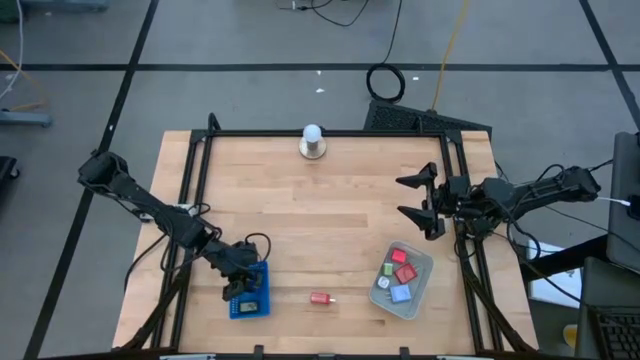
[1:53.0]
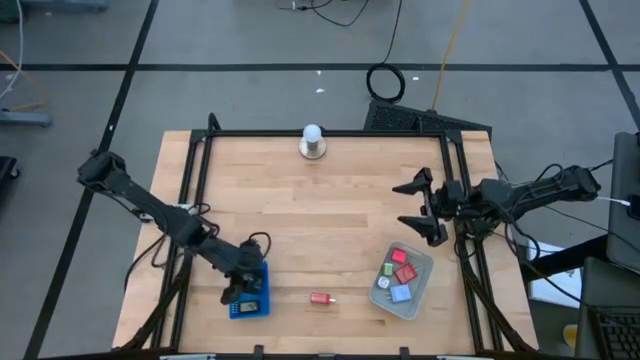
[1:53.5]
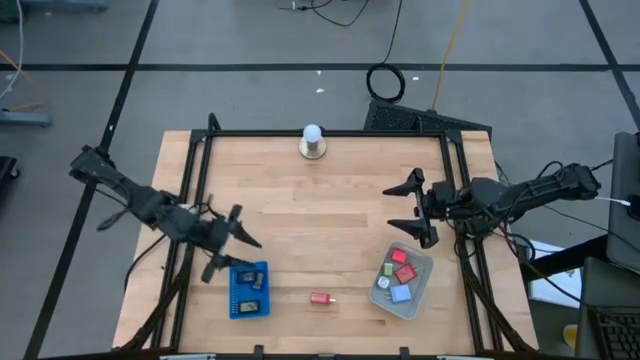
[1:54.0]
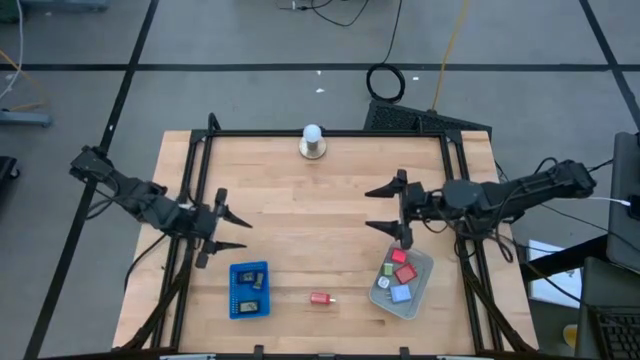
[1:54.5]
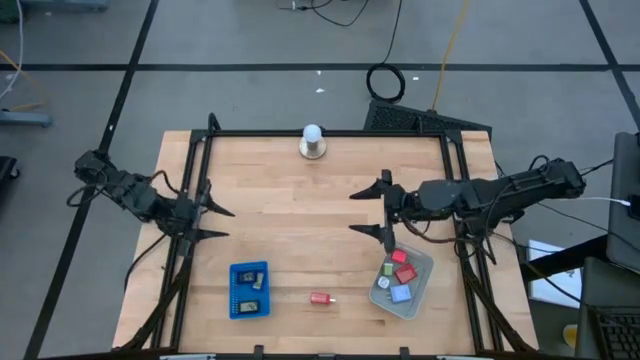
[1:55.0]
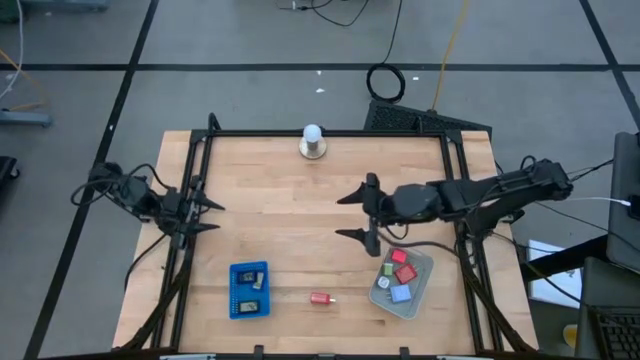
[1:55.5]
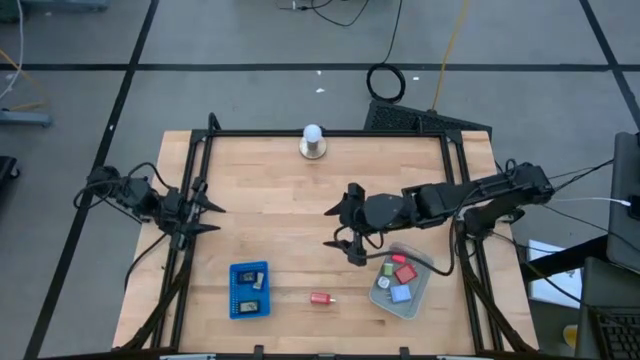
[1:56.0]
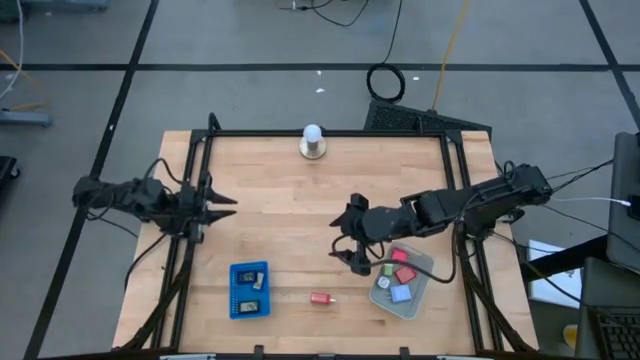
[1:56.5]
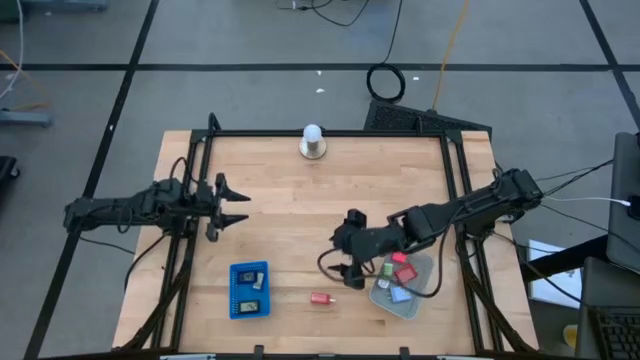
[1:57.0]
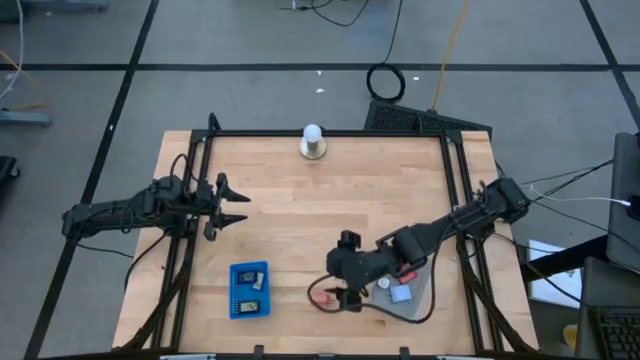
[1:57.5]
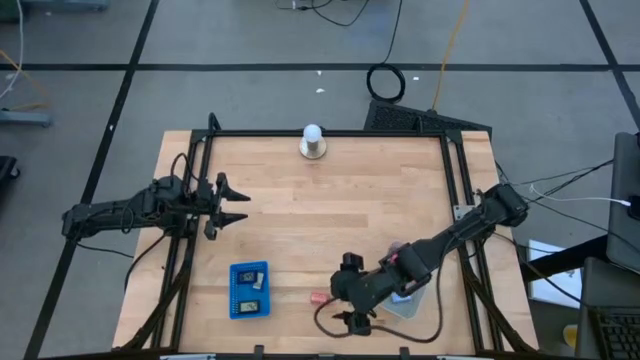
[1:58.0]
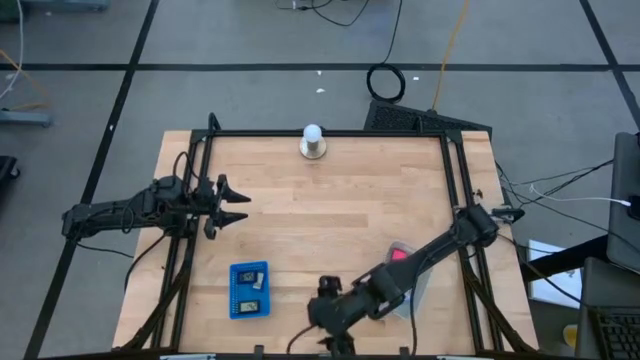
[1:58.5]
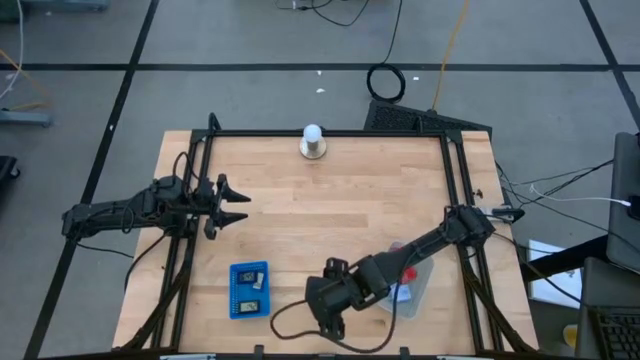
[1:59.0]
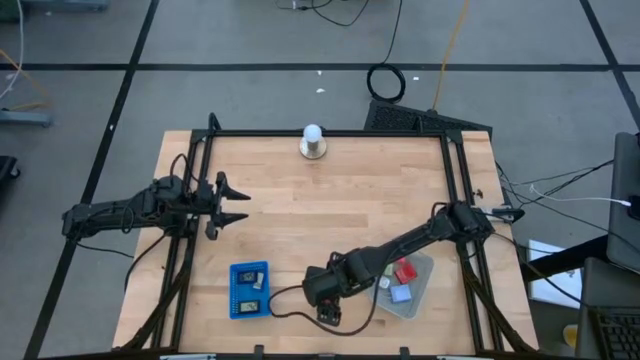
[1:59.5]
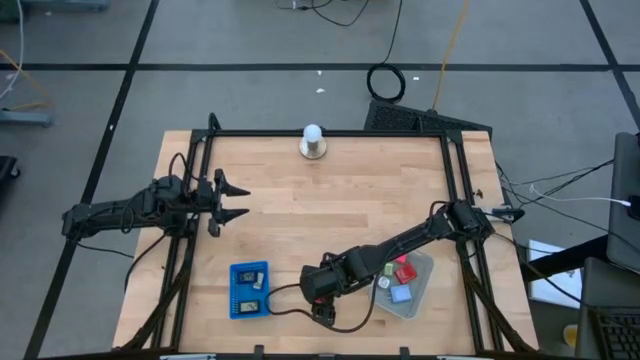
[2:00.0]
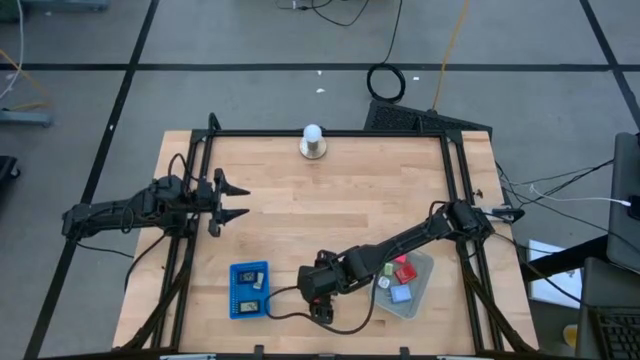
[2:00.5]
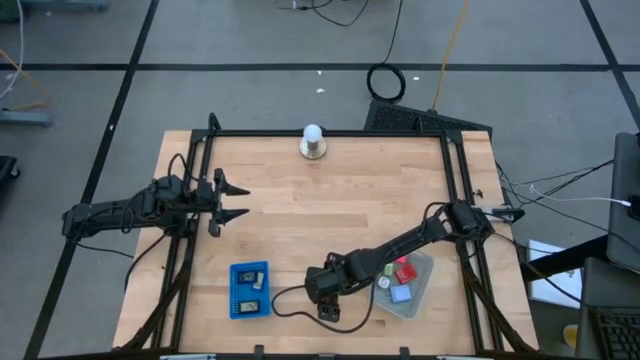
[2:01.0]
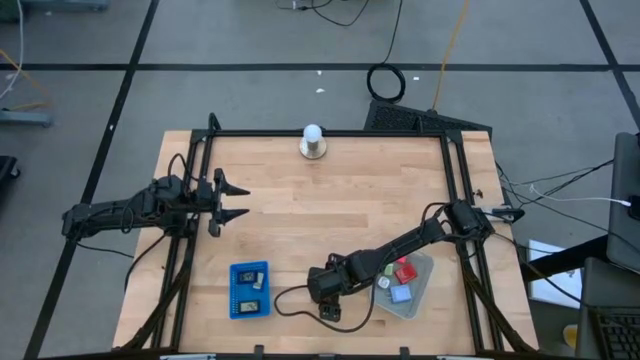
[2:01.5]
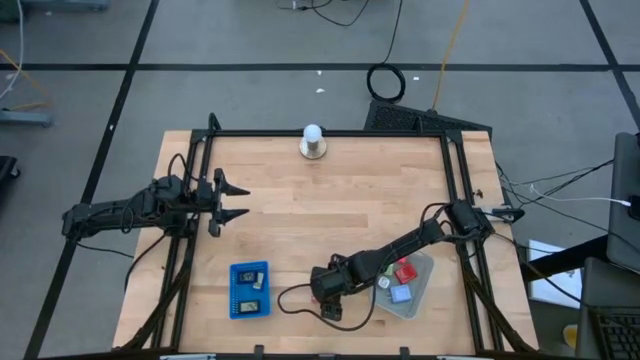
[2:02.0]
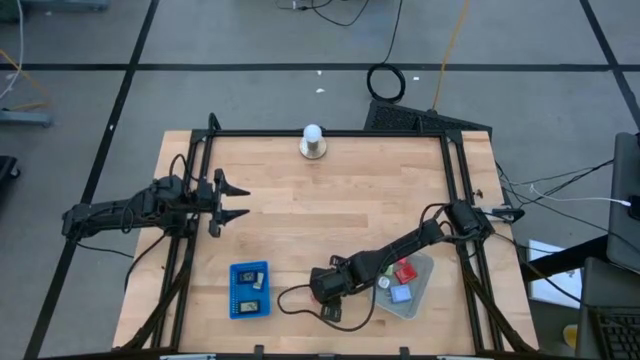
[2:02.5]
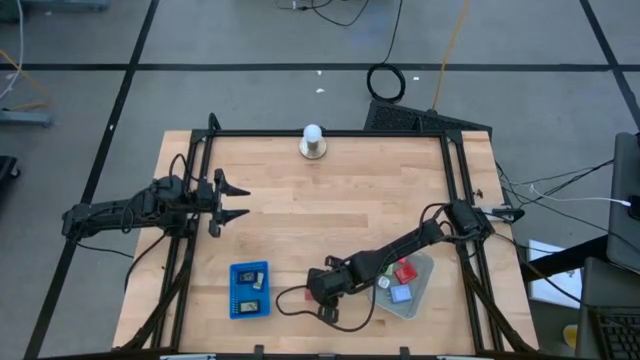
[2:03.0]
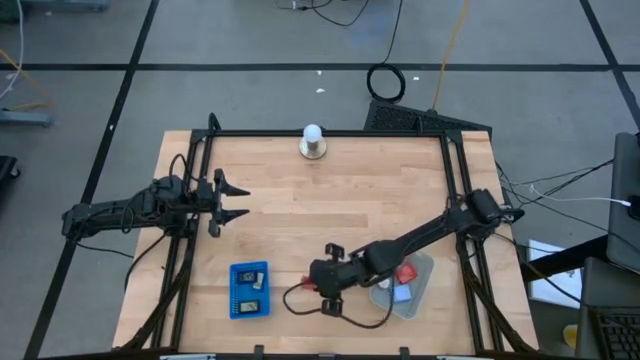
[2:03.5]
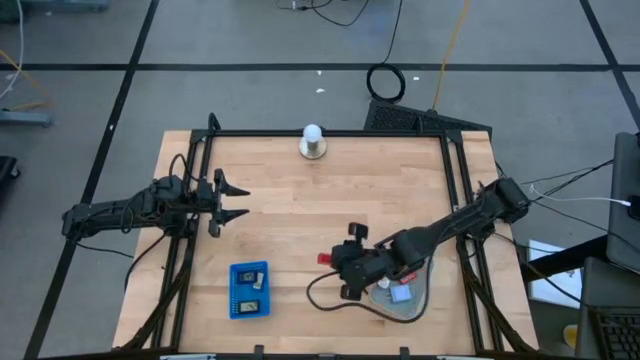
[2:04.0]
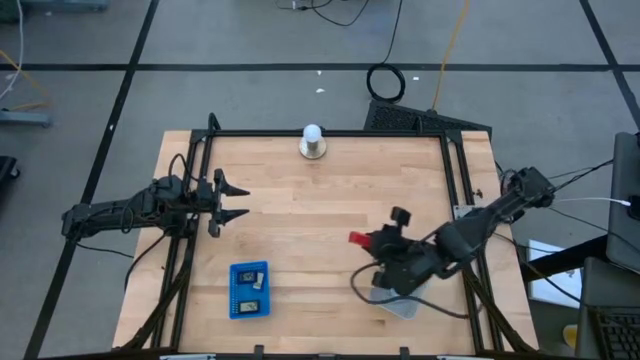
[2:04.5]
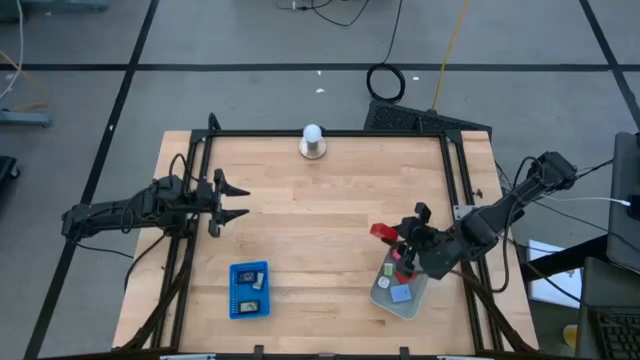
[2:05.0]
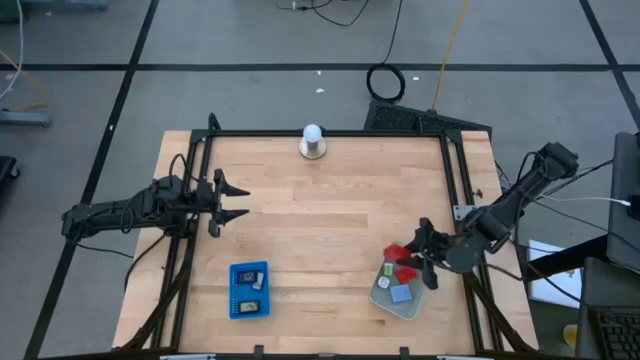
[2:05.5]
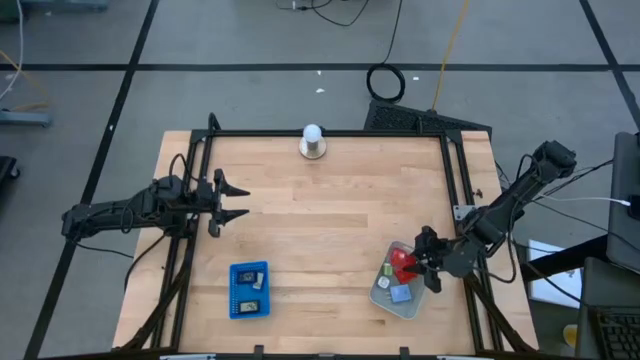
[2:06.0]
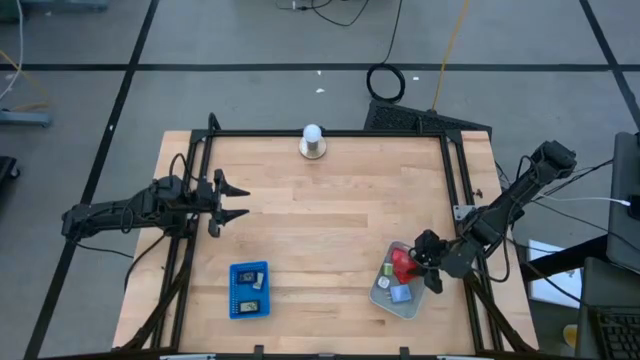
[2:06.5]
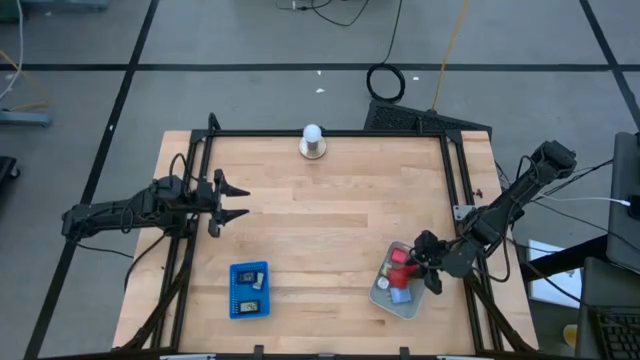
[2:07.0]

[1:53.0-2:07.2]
Task: Pick & Place Office items
Put the red charger adapter into the gray bin

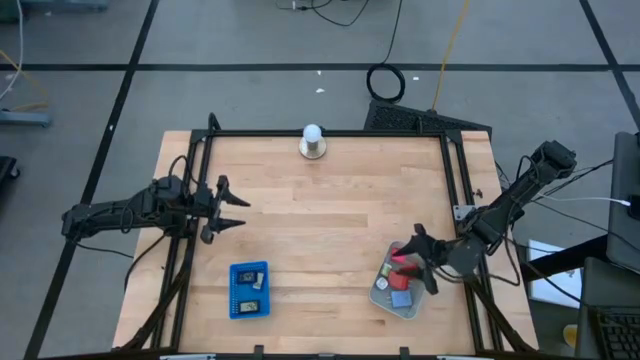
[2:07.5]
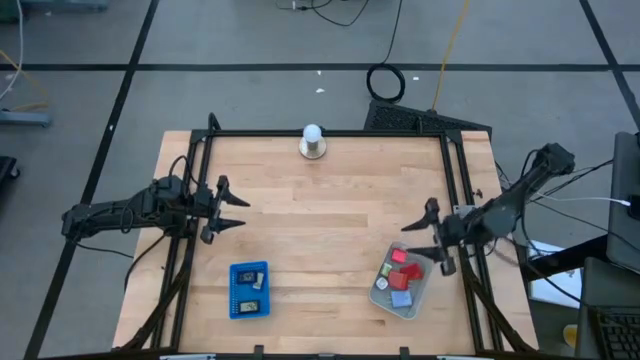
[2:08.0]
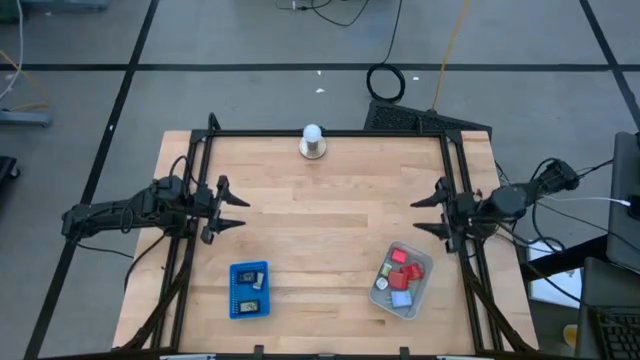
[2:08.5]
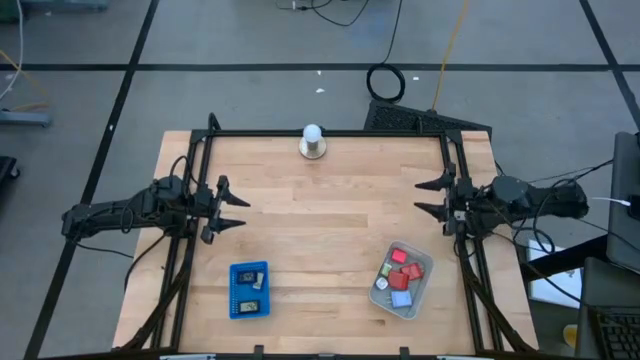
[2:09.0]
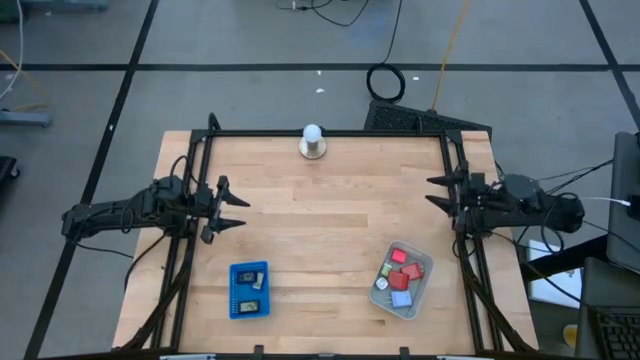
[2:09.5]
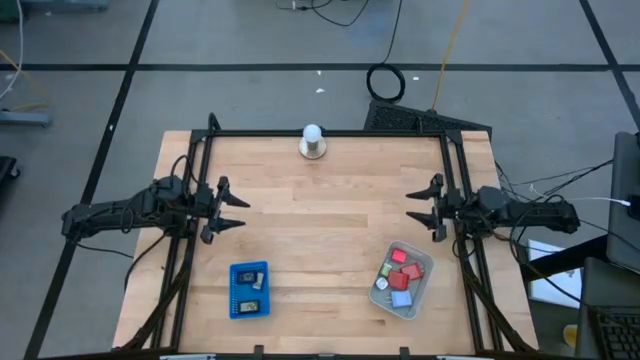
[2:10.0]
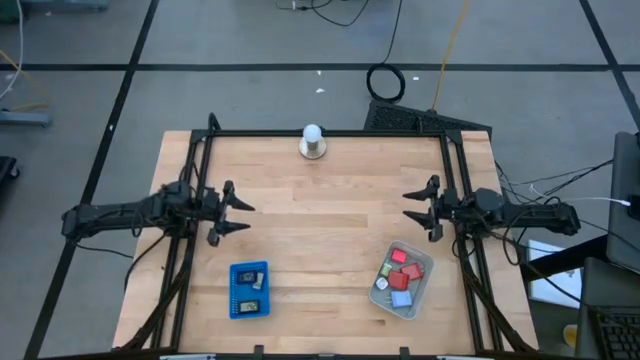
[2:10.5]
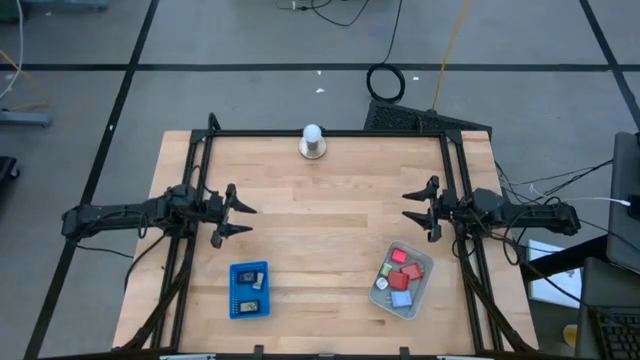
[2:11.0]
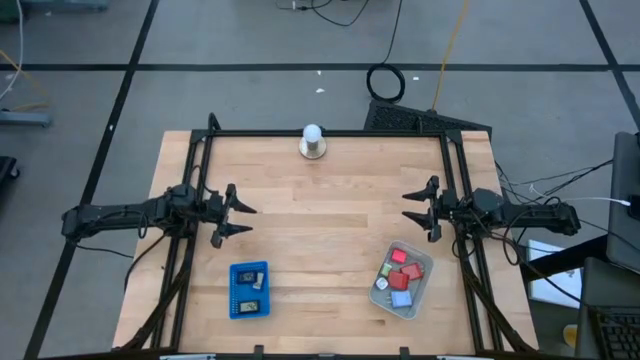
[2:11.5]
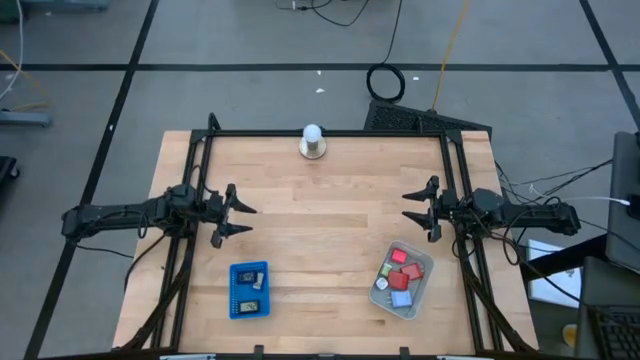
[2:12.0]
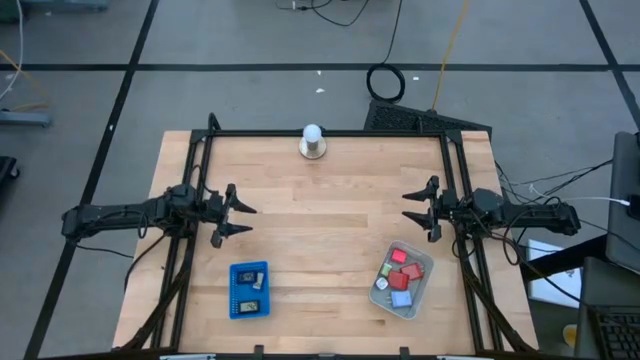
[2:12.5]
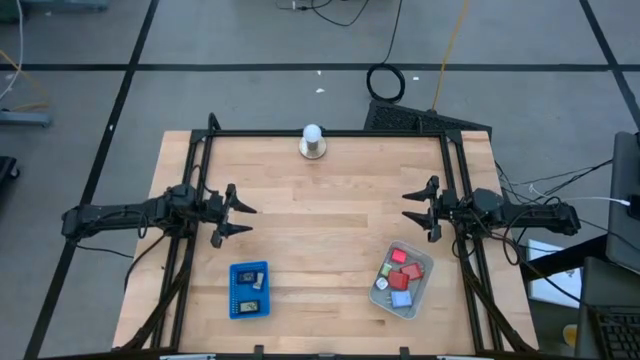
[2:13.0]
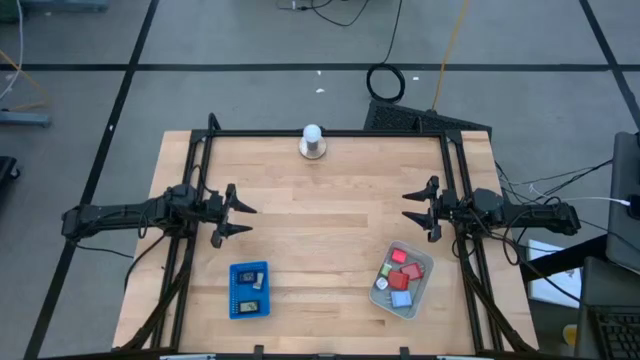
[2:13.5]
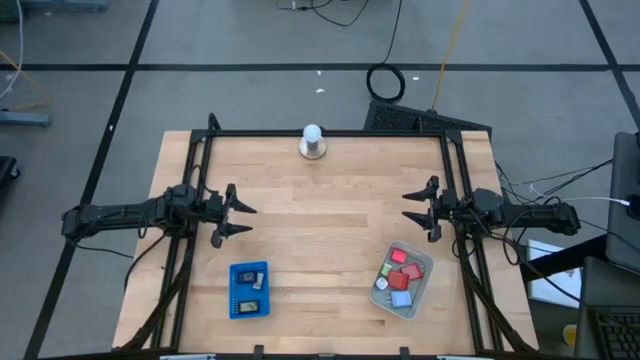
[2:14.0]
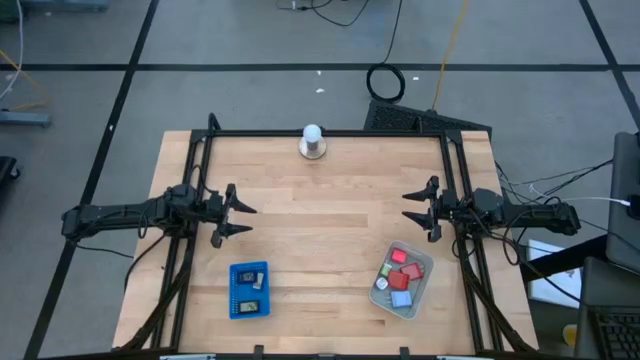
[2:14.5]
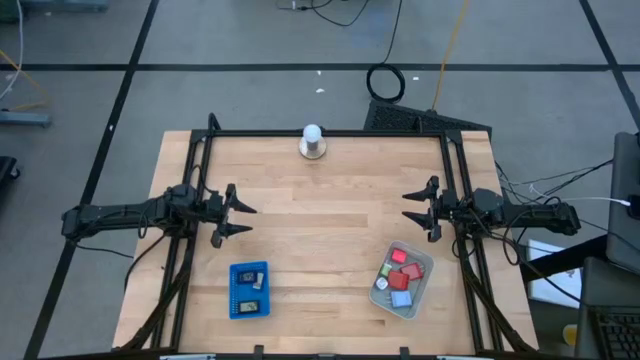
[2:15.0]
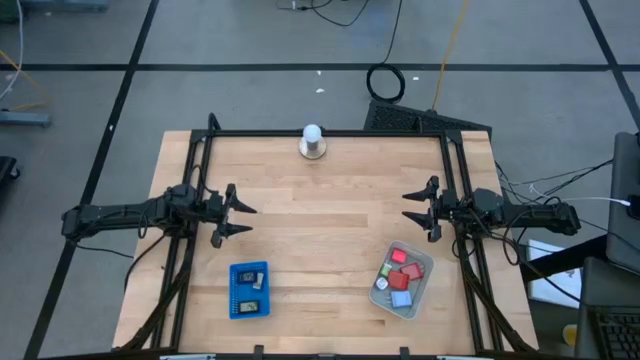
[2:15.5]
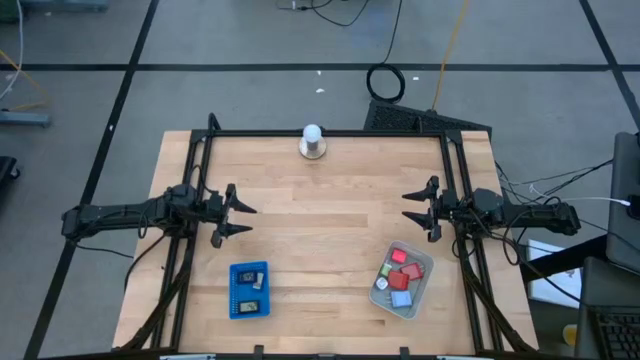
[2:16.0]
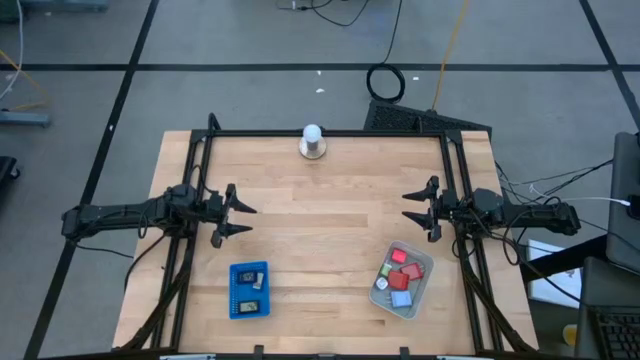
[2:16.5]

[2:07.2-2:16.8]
Return to Home Position
